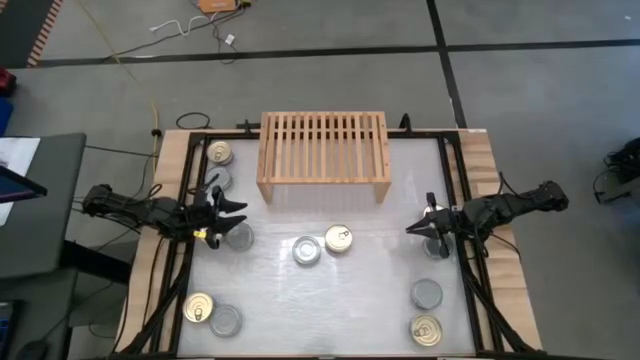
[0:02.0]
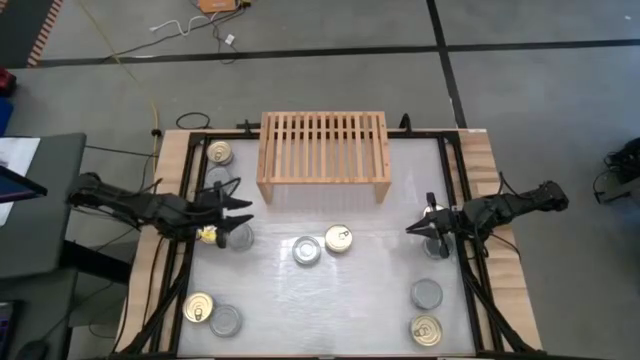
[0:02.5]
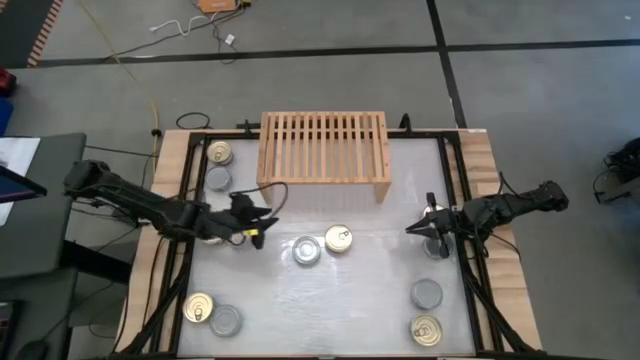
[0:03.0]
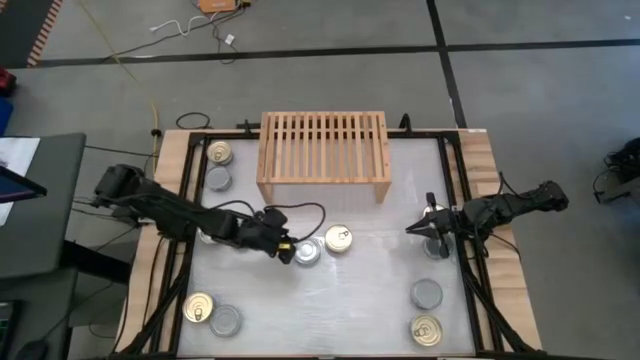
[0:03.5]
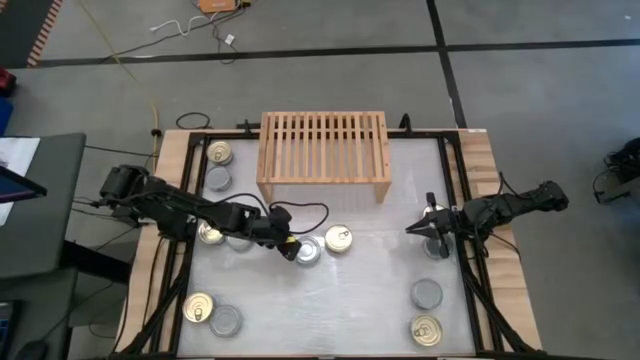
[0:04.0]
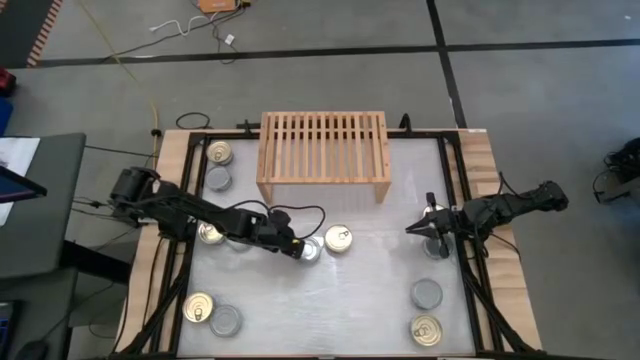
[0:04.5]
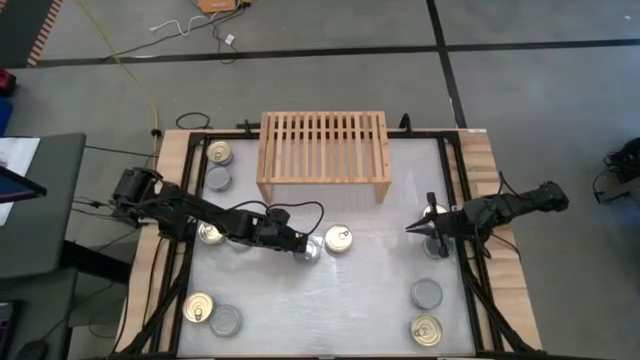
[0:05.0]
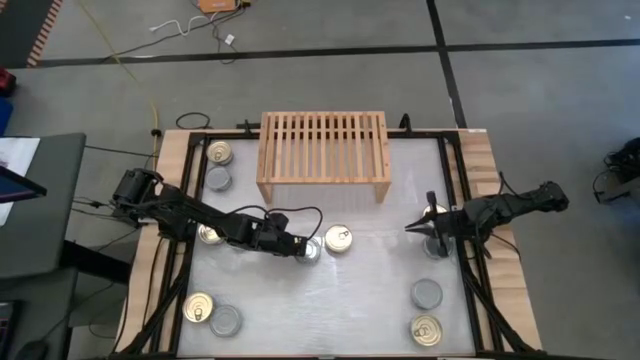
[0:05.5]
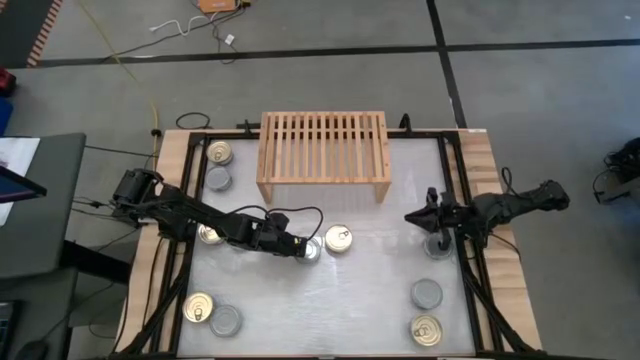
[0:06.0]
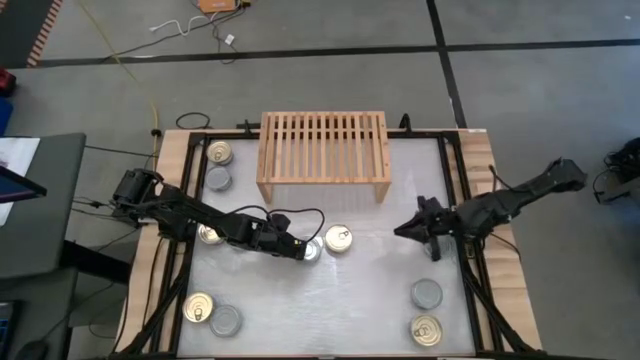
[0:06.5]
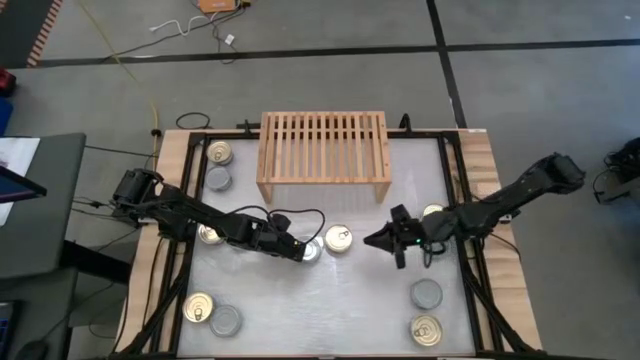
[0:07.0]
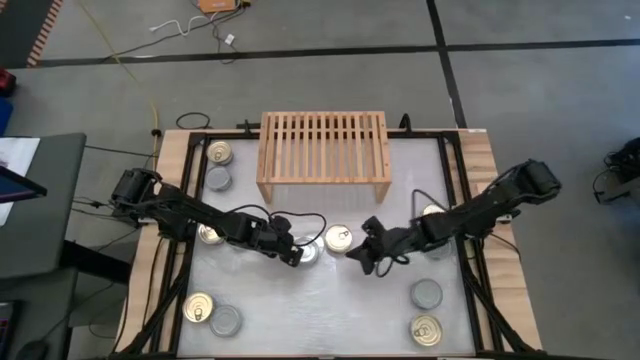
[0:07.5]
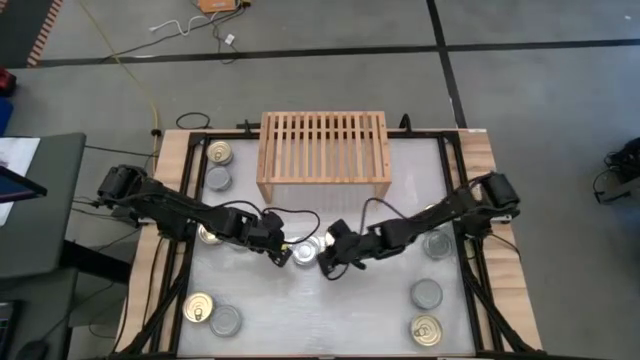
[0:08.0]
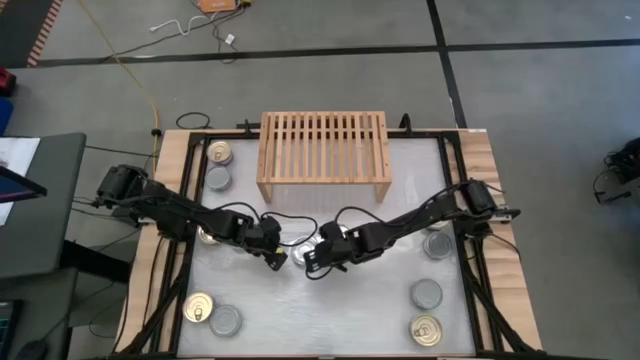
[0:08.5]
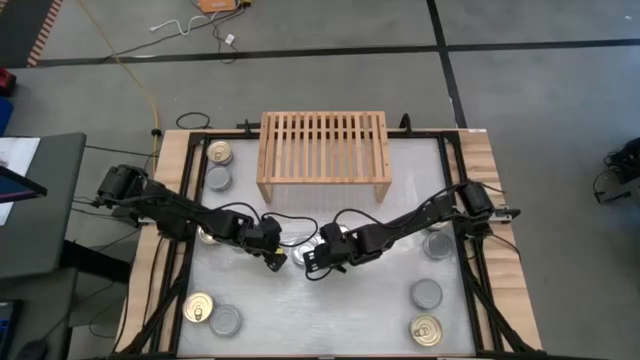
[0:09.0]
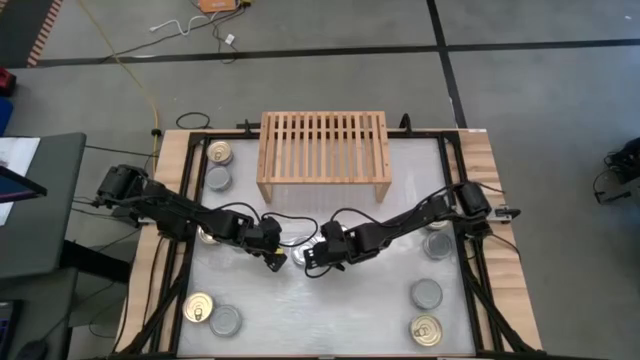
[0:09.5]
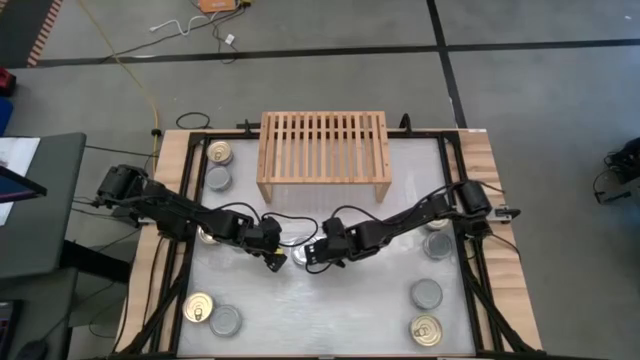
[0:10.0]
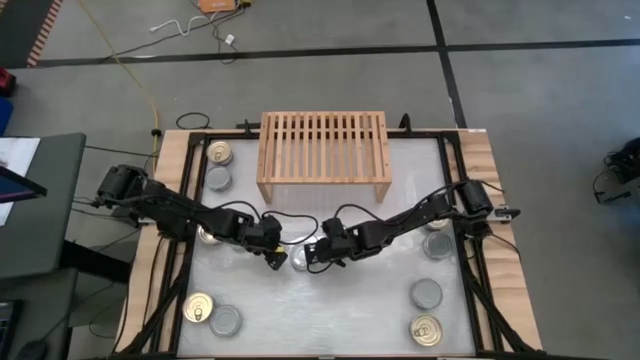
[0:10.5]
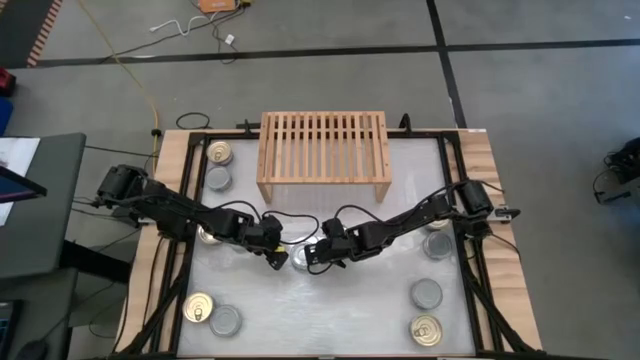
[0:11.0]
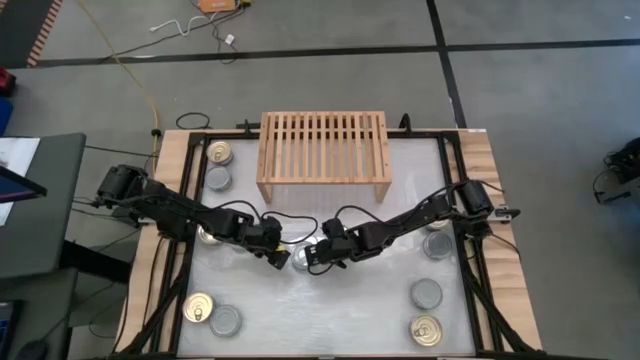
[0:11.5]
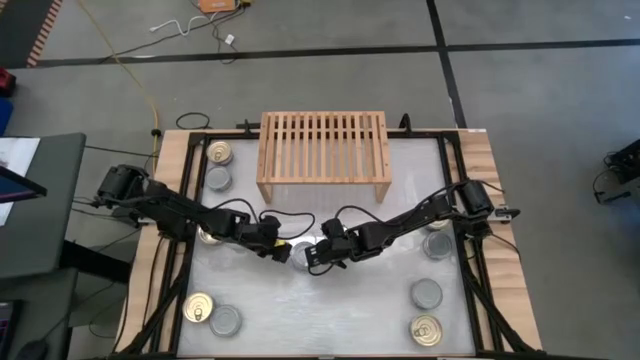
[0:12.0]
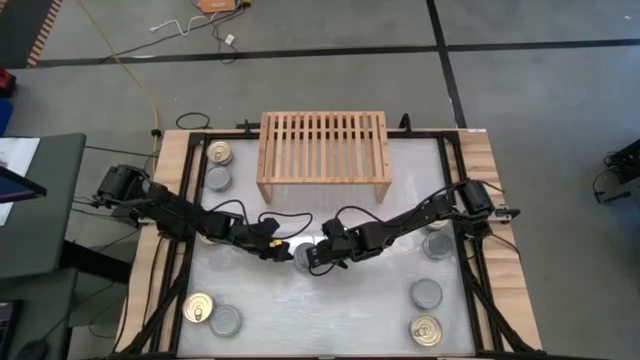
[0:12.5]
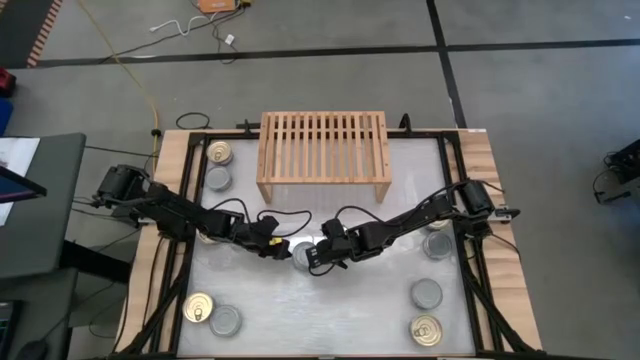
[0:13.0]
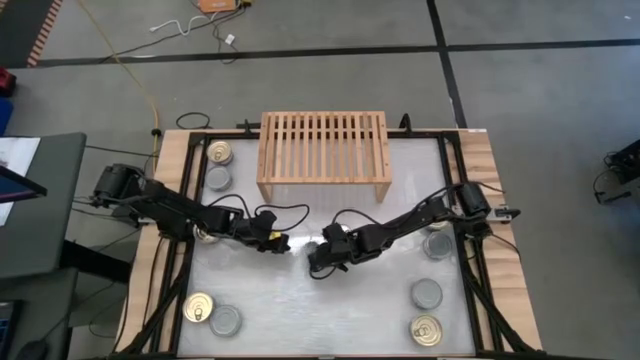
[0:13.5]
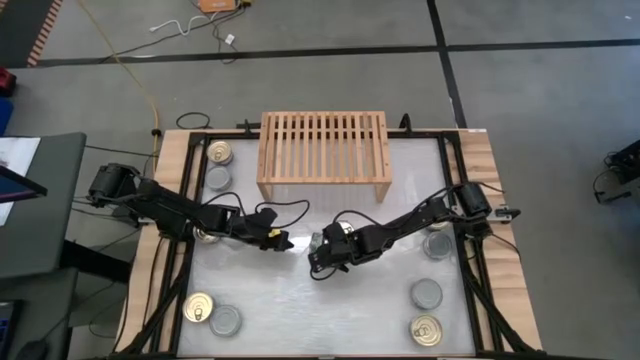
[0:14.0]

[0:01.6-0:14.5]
Task: Stack canned seafood by type on shelf
Put the green tuna can on the shelf

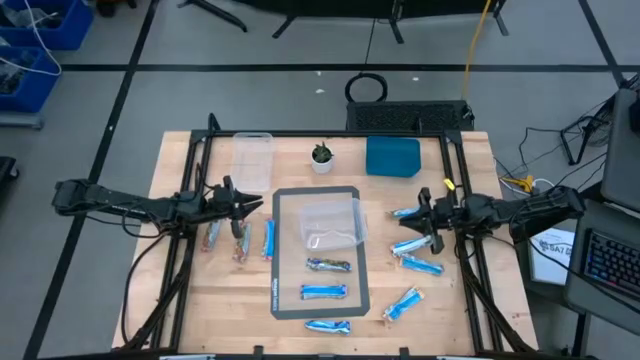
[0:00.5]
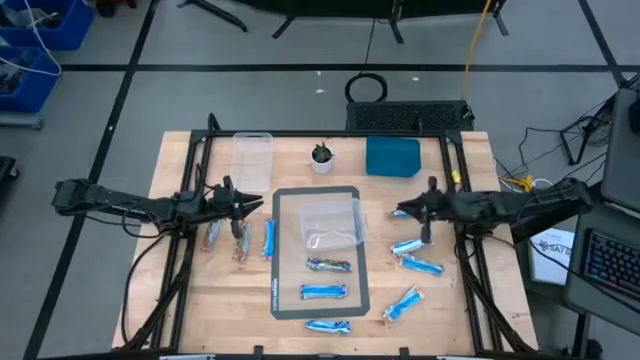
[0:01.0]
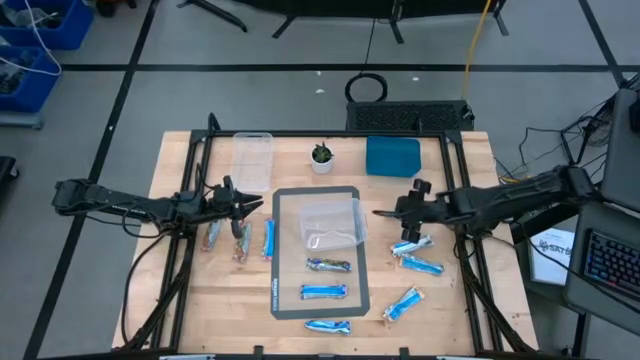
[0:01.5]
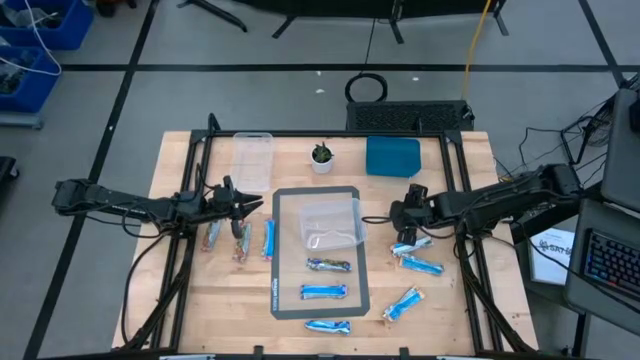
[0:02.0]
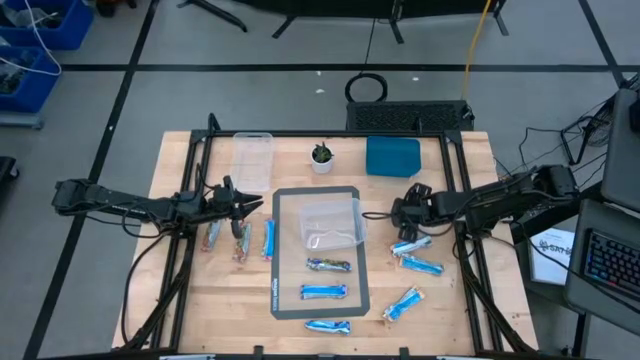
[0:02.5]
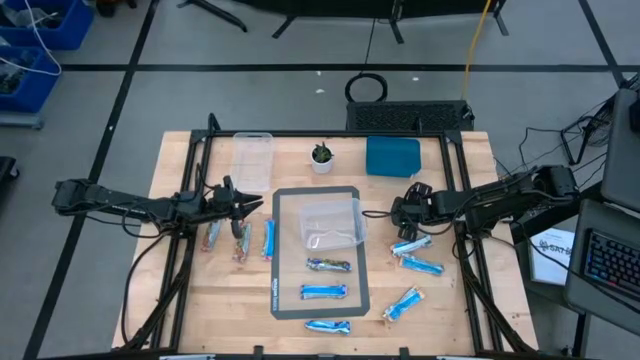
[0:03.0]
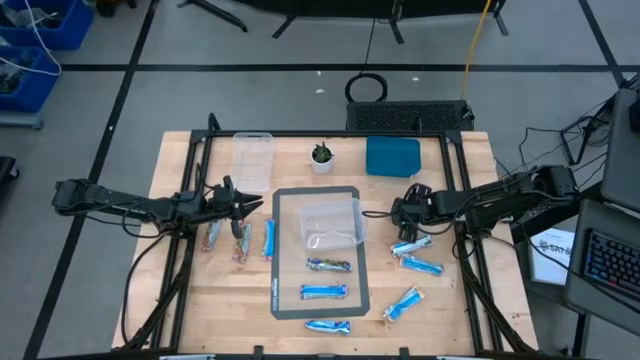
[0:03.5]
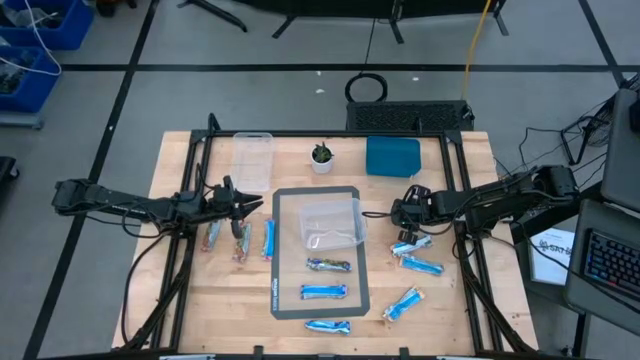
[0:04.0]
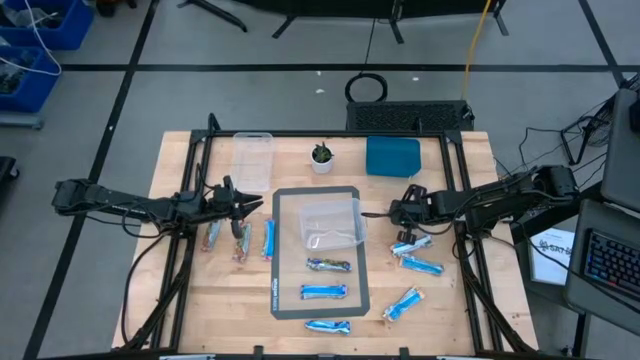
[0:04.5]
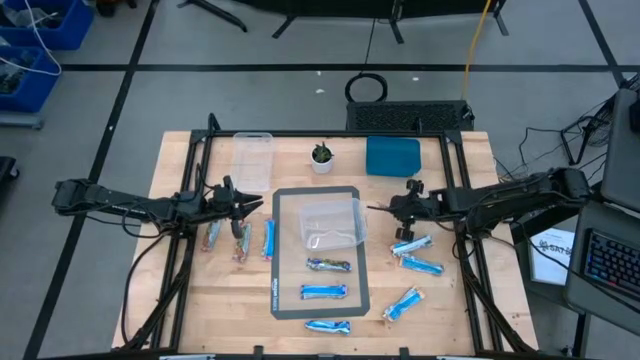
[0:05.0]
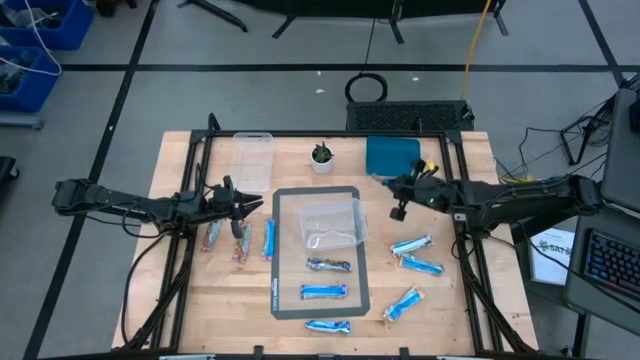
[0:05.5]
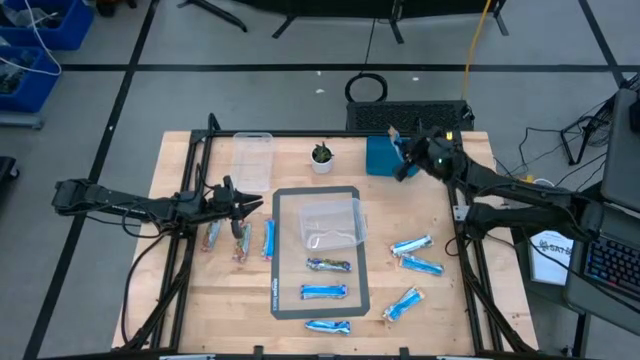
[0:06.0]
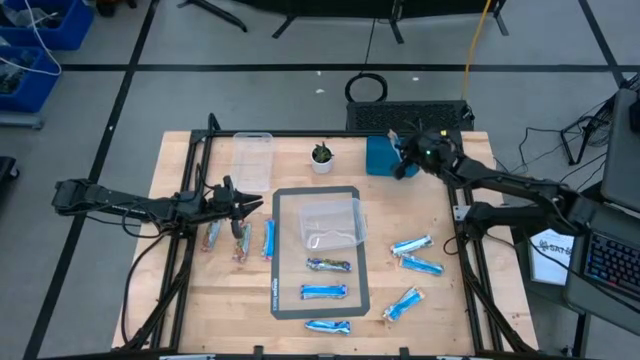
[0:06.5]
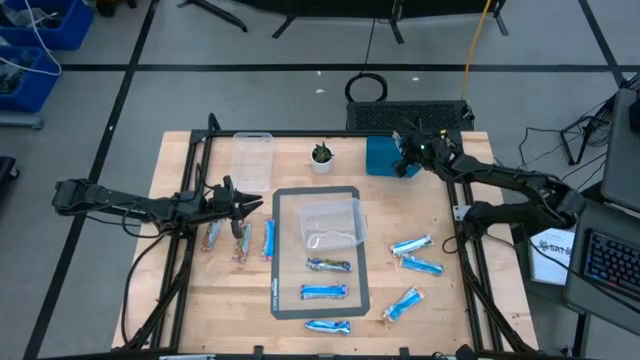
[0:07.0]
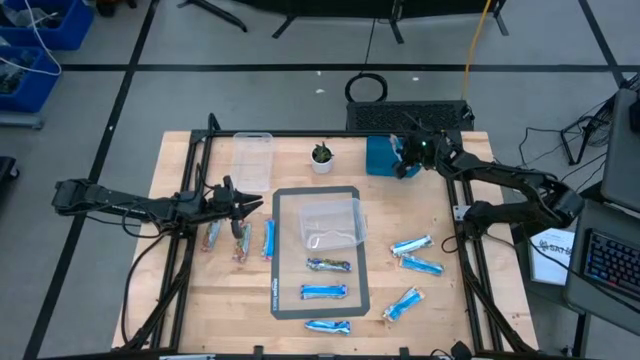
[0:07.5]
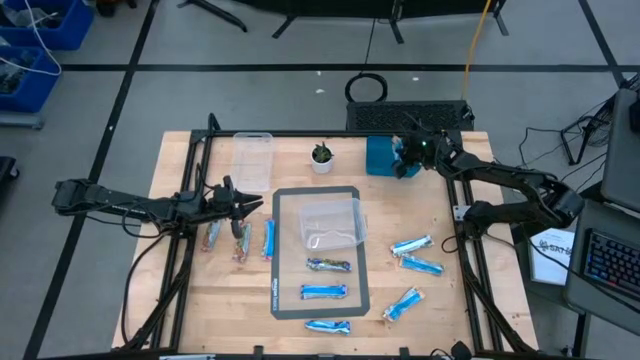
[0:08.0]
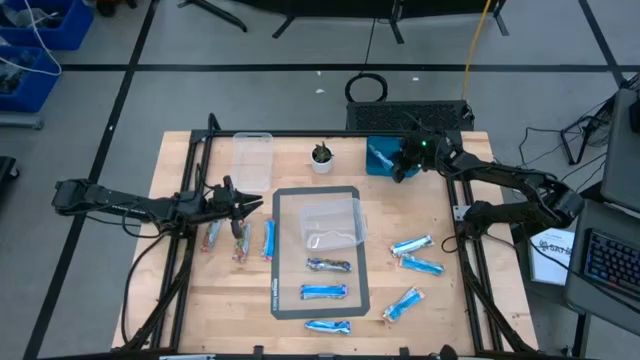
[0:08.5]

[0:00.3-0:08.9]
Task: Pick and place Granola Bars by type
Put the snack into the right bin
